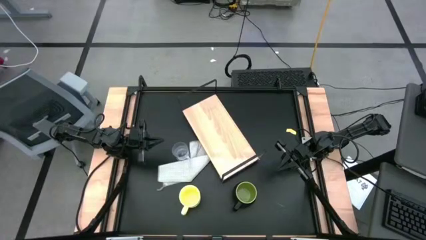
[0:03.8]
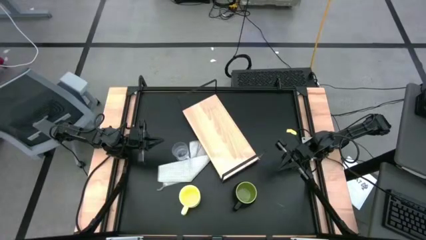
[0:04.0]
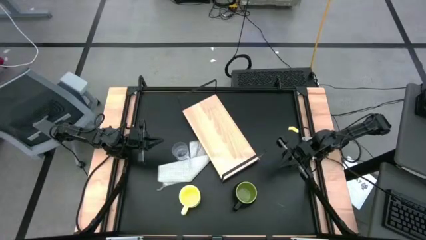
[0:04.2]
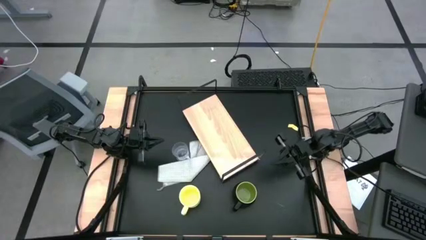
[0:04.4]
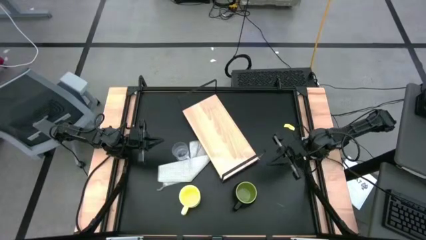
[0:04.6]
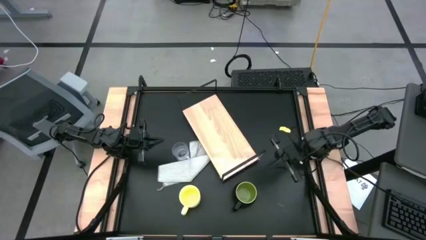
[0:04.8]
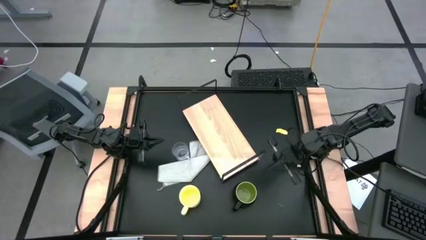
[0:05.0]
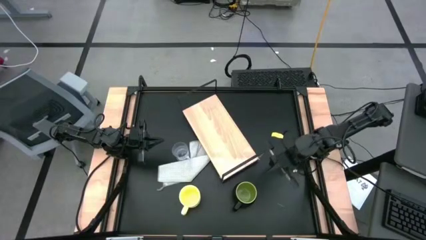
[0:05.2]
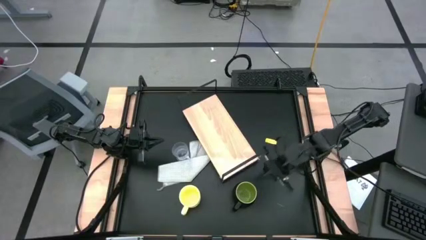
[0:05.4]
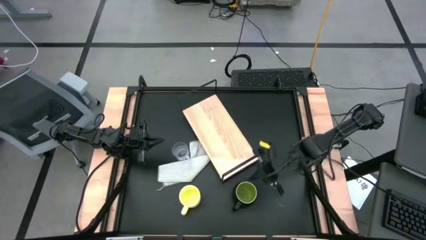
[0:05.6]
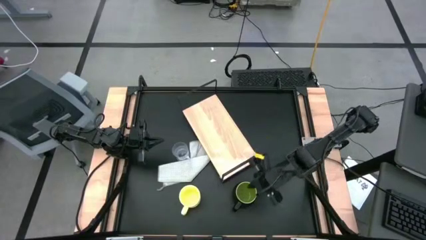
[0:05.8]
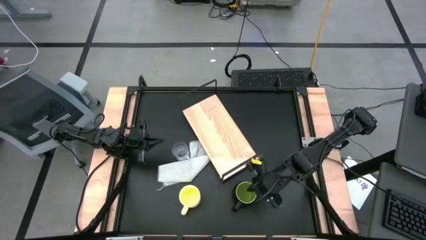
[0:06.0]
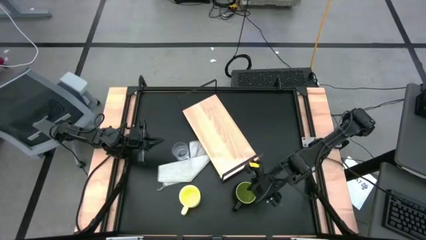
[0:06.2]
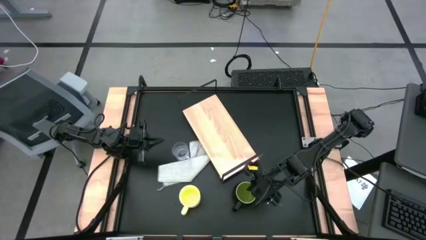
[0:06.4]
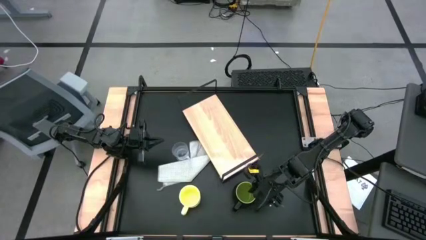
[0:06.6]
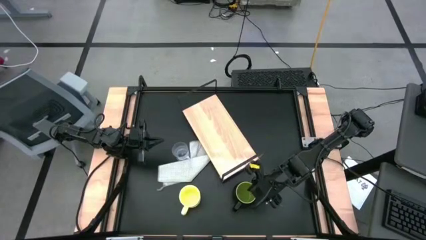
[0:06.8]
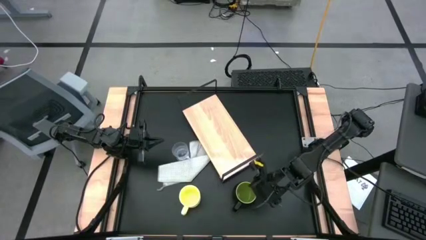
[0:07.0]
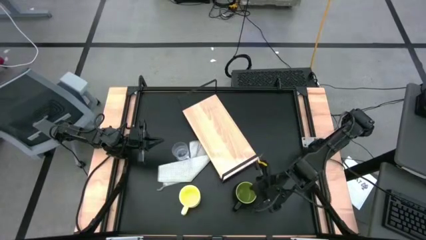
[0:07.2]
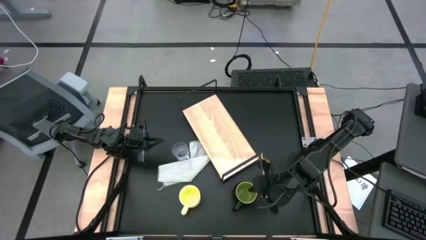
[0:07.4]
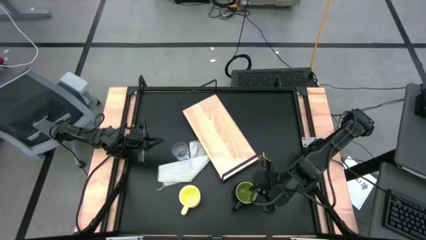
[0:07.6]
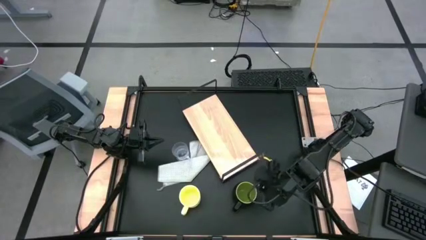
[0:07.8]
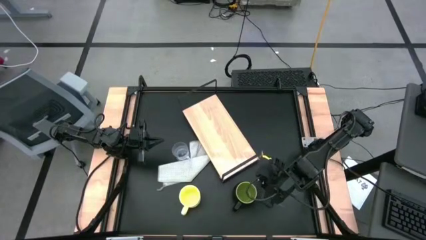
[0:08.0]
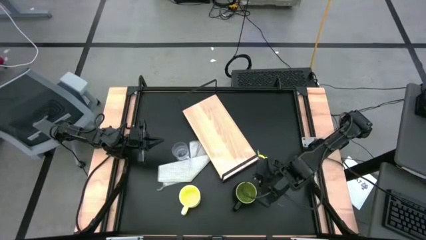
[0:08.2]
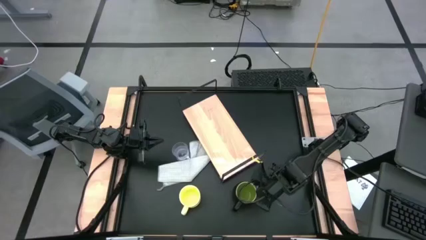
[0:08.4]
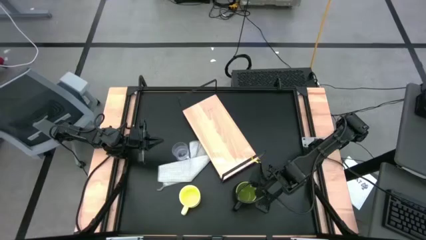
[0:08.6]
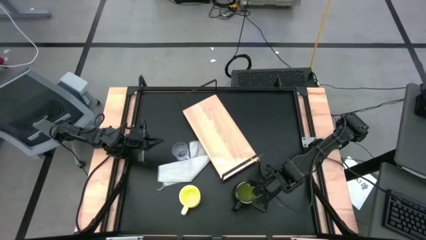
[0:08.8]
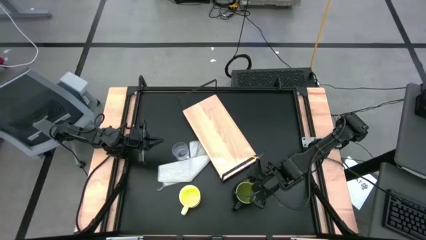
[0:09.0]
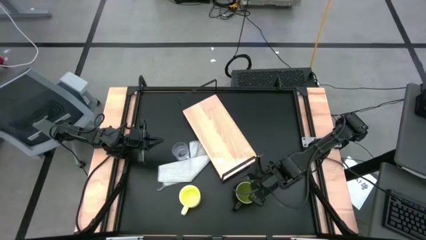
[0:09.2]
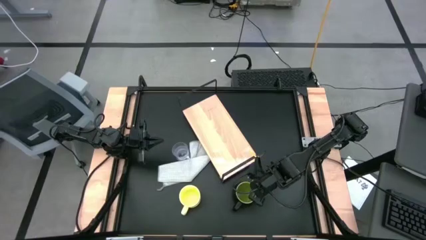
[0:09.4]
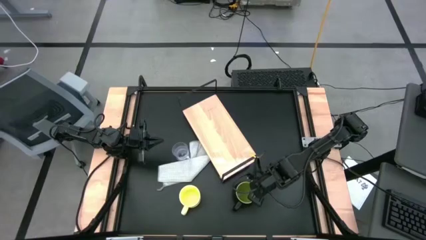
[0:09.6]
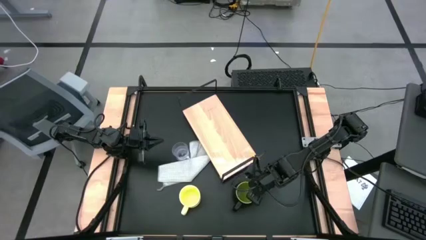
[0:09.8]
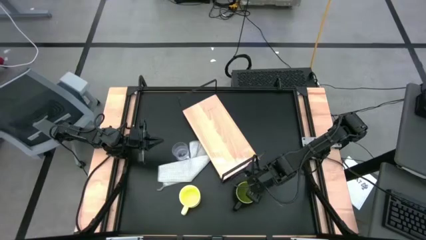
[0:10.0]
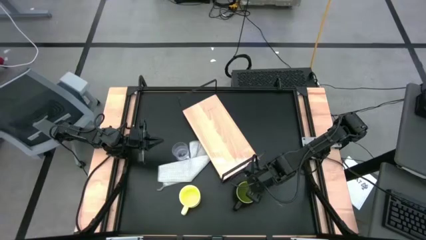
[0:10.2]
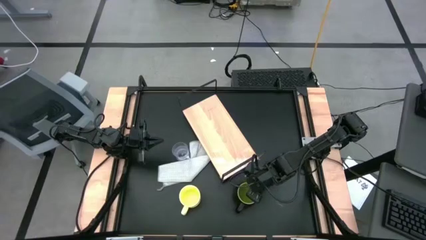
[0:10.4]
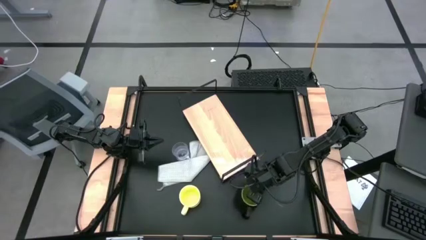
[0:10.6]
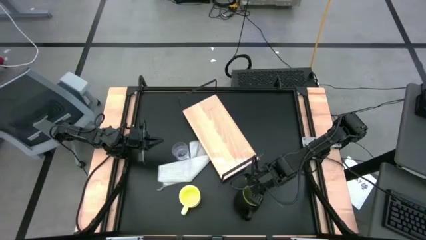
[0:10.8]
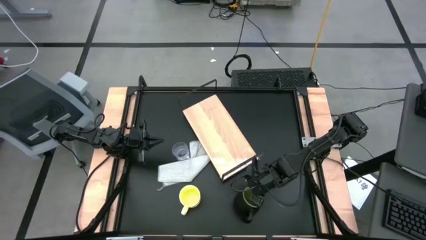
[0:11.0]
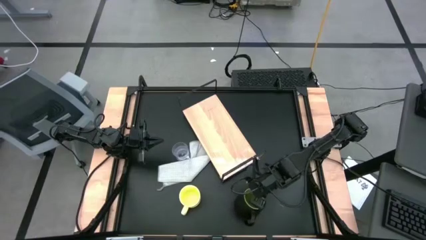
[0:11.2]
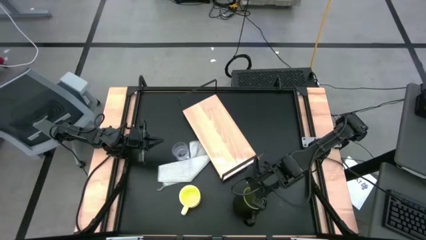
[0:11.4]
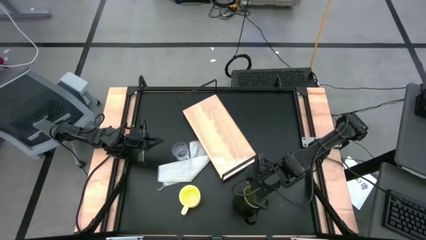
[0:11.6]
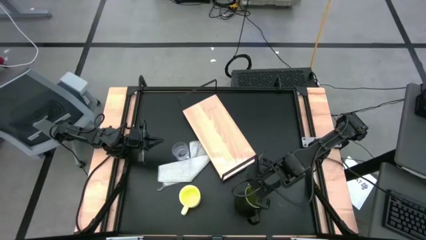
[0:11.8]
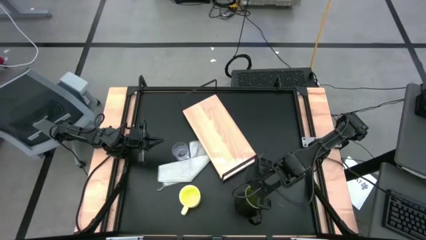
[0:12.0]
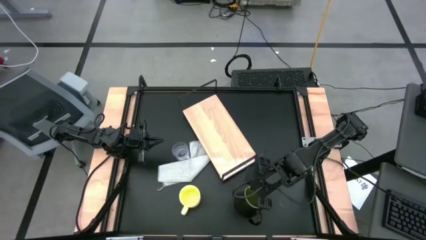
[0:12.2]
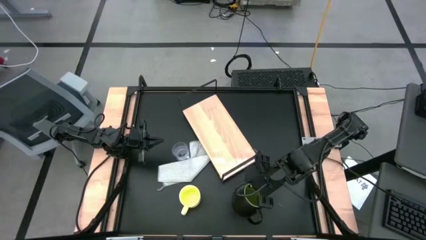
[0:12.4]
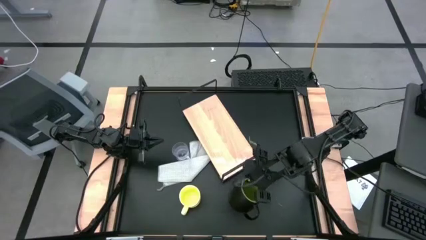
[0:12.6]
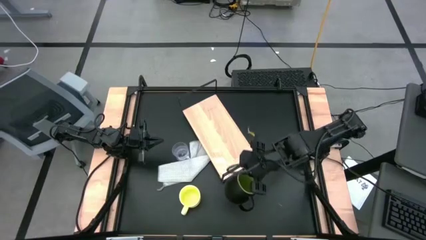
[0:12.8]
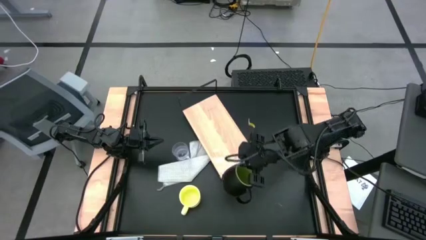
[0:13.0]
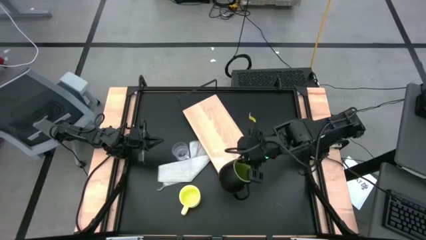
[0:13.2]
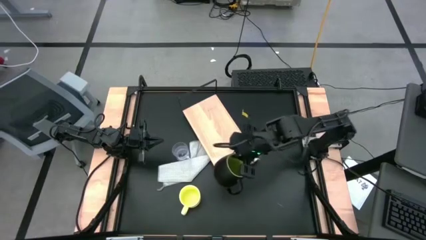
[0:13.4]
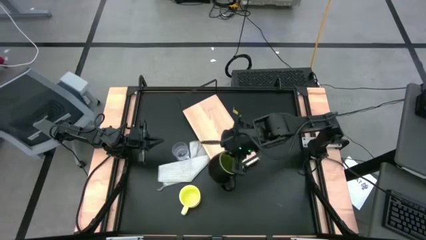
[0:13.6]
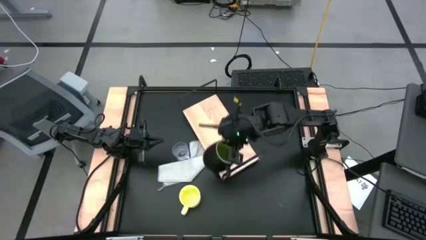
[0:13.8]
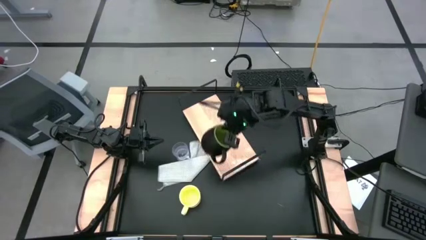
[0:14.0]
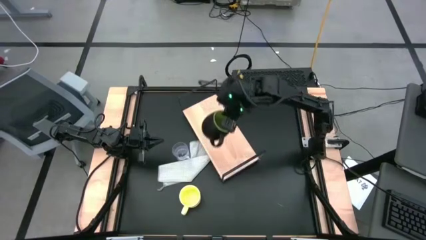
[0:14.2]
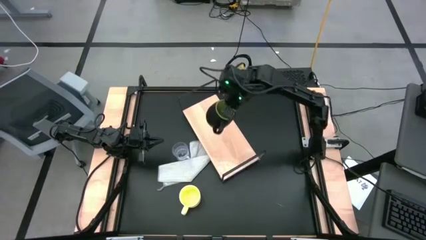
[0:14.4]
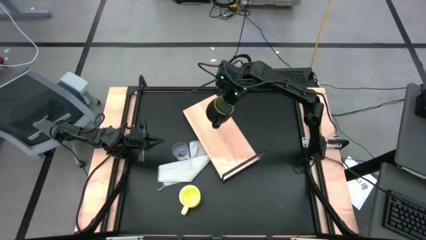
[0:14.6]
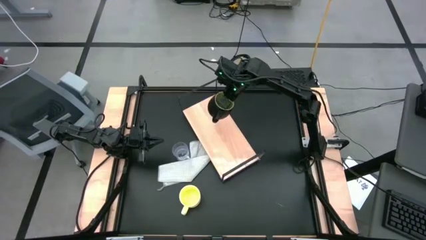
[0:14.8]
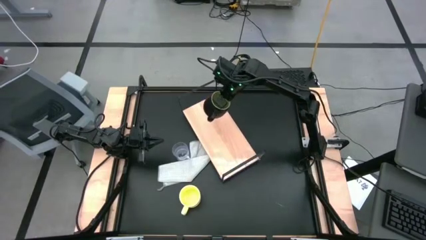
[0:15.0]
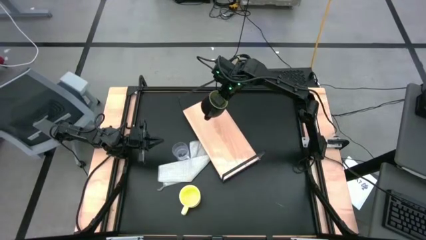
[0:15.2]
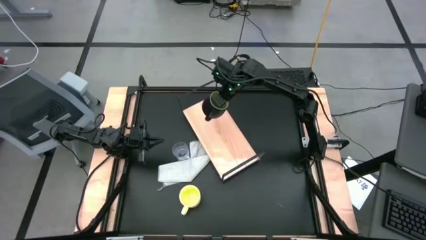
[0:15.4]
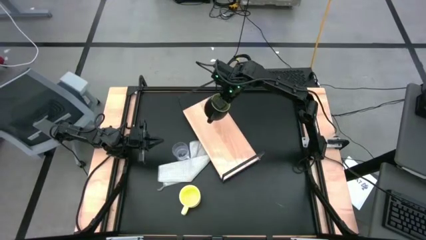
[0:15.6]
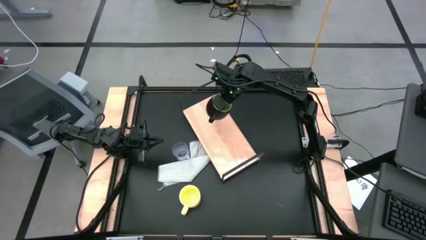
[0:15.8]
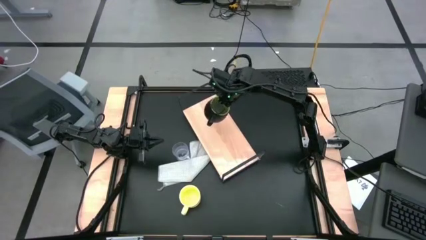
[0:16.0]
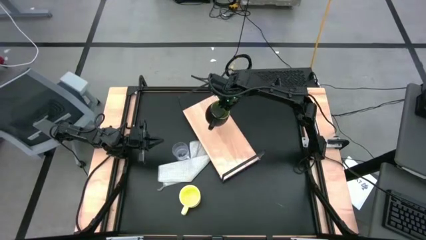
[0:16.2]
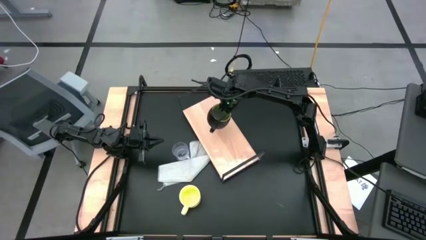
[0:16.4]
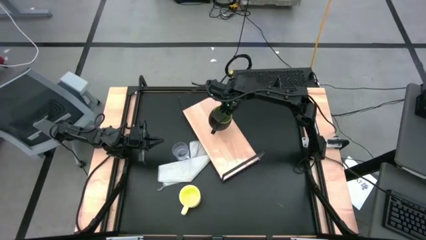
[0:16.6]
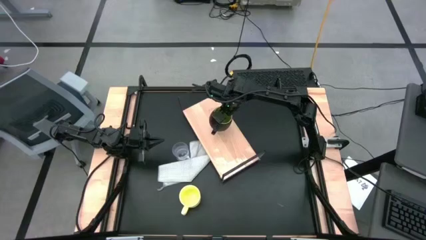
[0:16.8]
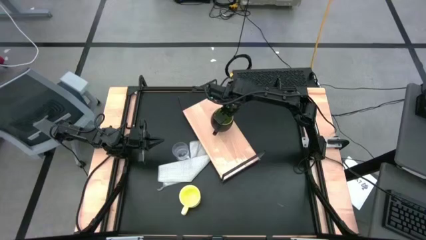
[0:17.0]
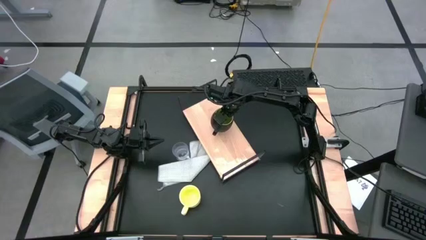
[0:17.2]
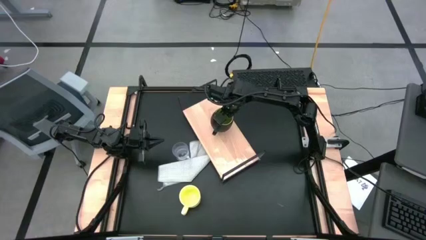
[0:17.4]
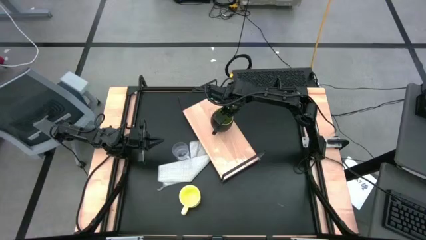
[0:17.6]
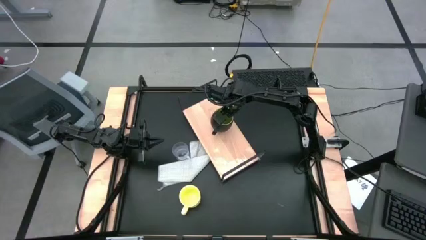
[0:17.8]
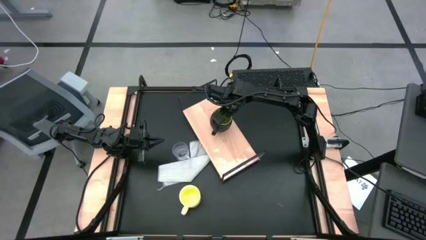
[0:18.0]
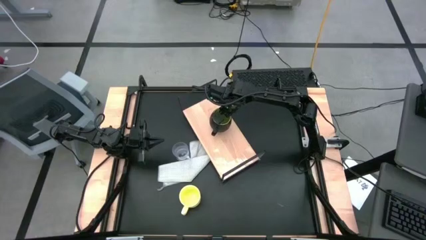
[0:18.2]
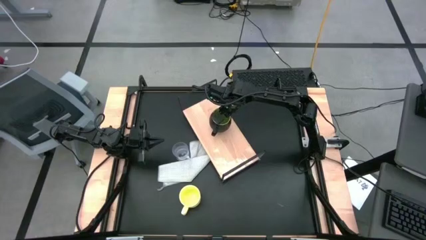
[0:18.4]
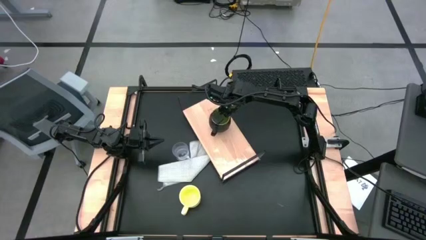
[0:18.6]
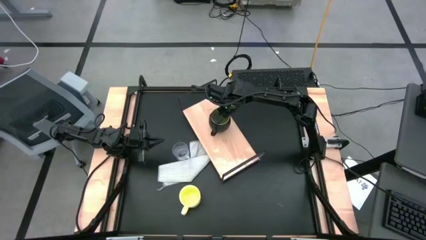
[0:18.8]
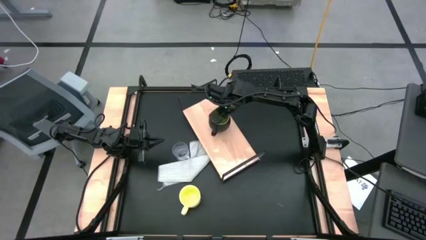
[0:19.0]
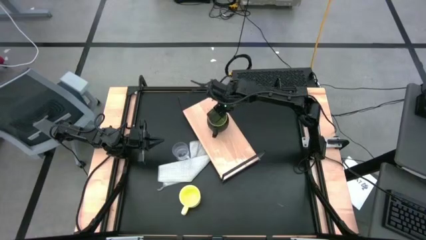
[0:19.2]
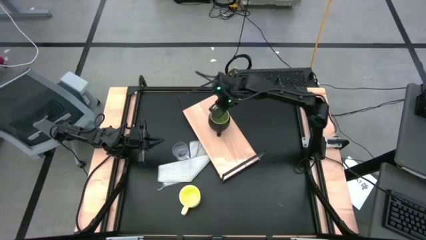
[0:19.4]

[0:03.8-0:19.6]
Task: Stack small to large cups/mugs on shelf
Put the black mug on the shelf
